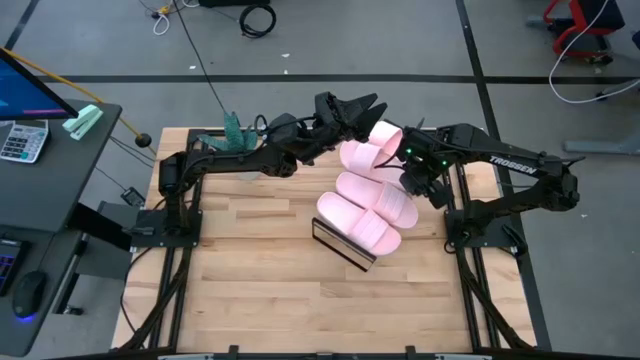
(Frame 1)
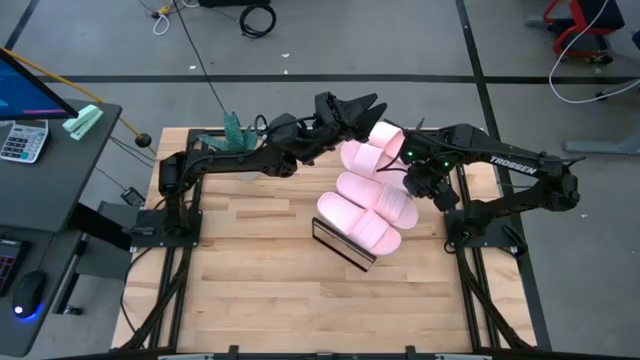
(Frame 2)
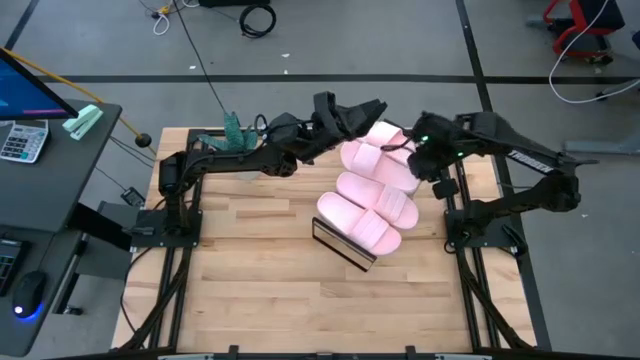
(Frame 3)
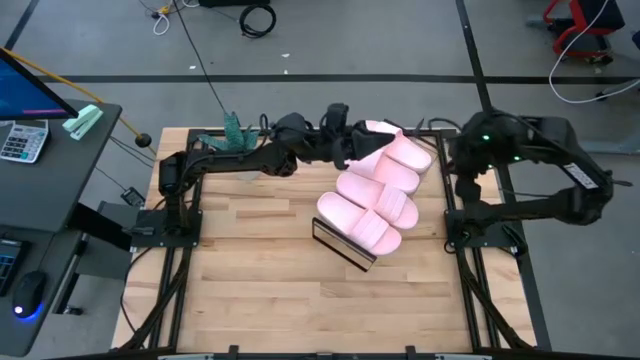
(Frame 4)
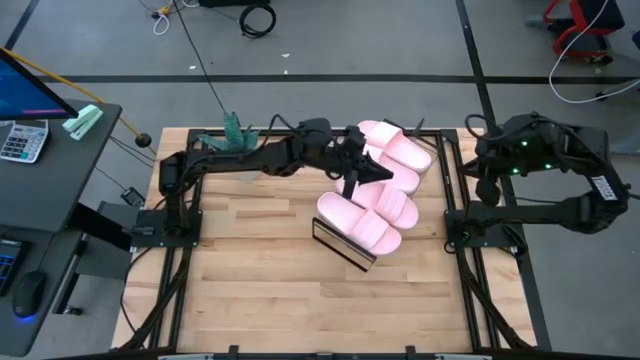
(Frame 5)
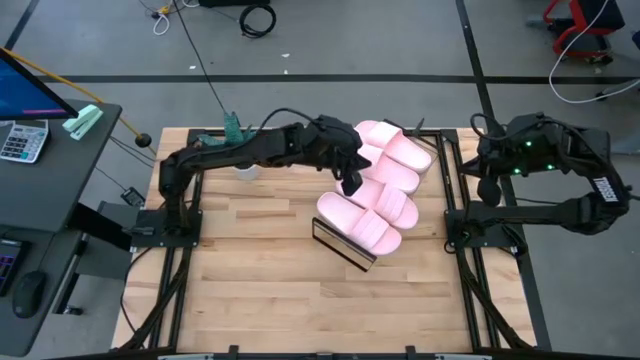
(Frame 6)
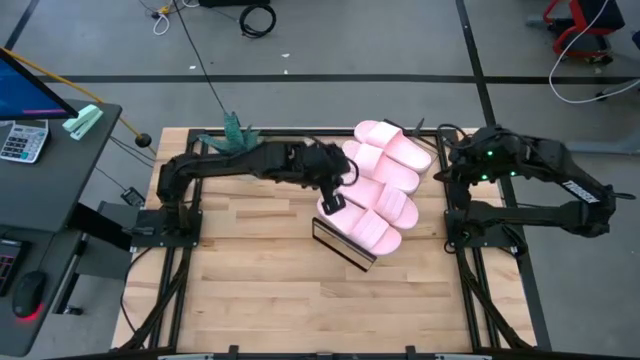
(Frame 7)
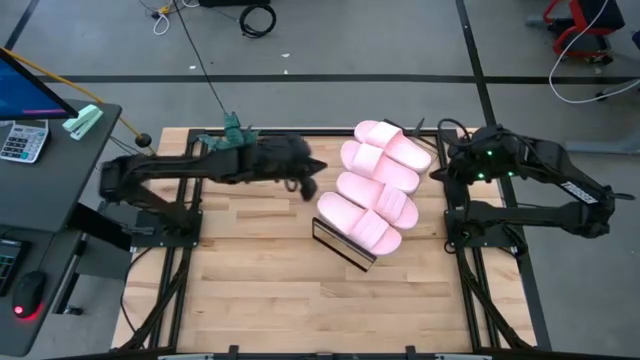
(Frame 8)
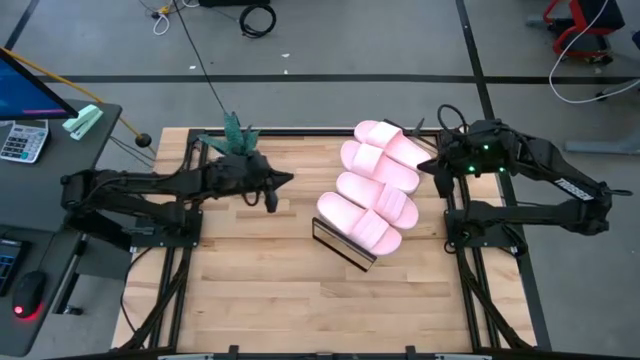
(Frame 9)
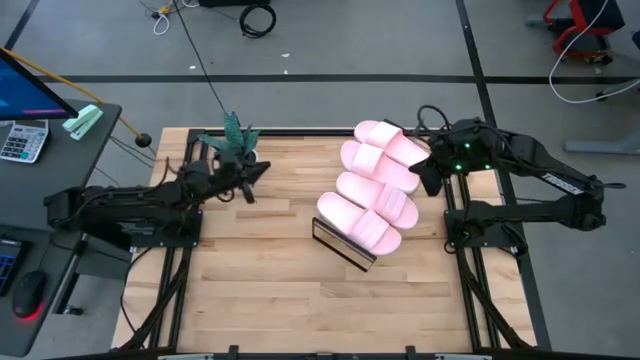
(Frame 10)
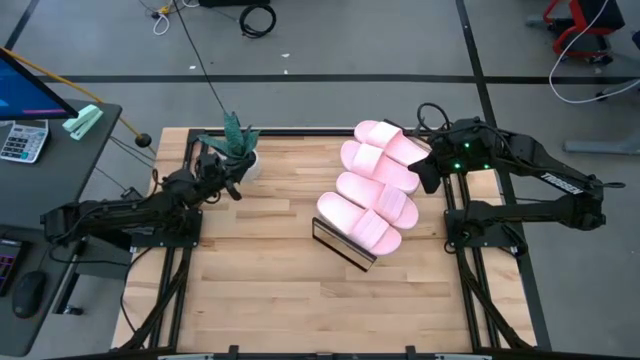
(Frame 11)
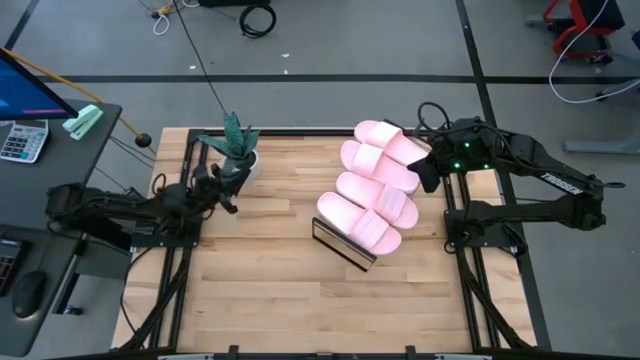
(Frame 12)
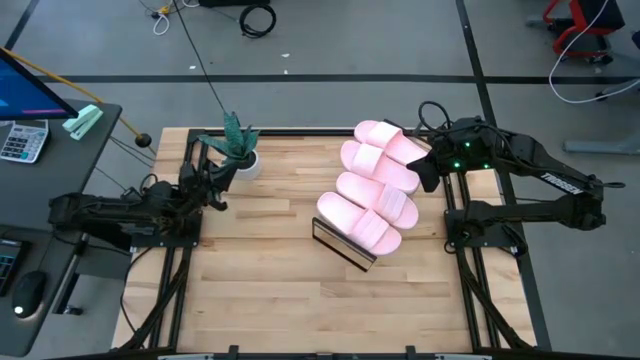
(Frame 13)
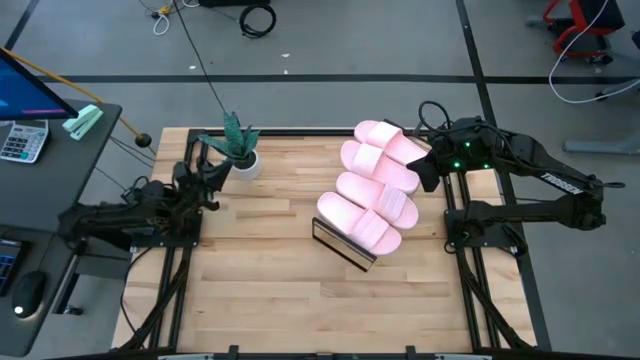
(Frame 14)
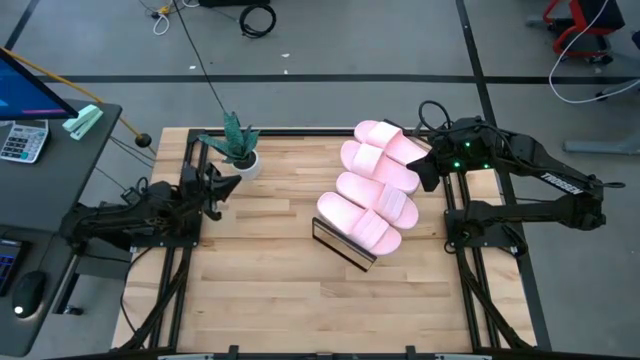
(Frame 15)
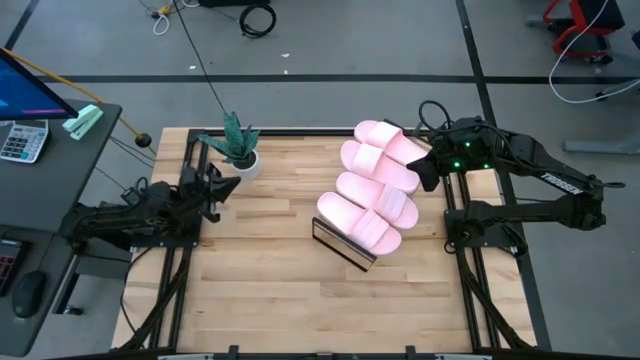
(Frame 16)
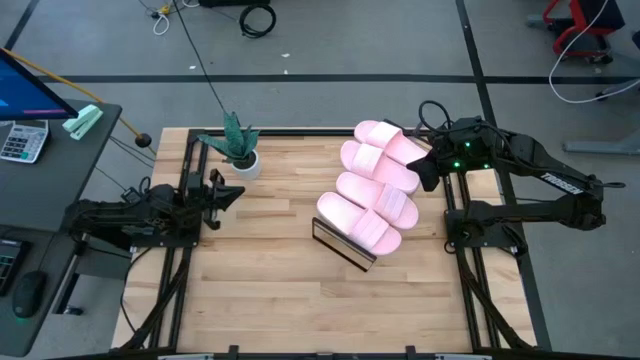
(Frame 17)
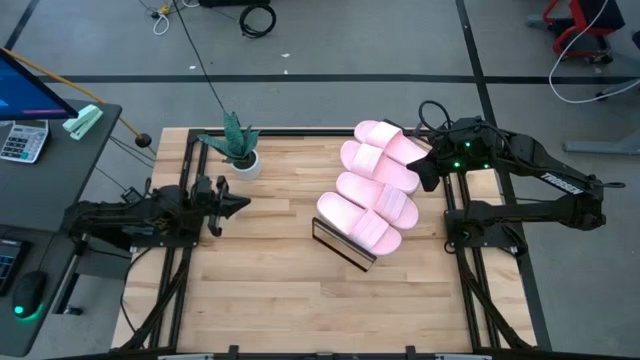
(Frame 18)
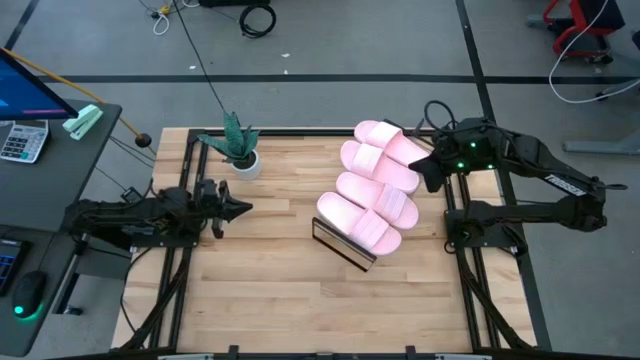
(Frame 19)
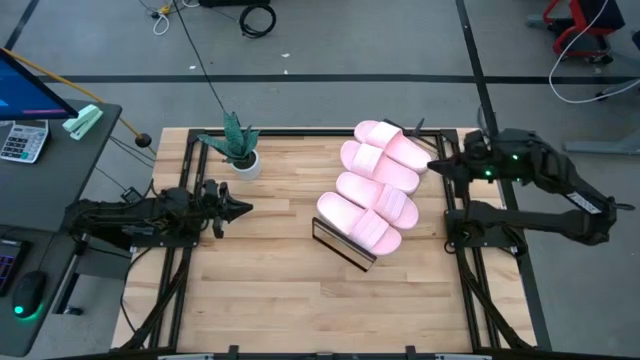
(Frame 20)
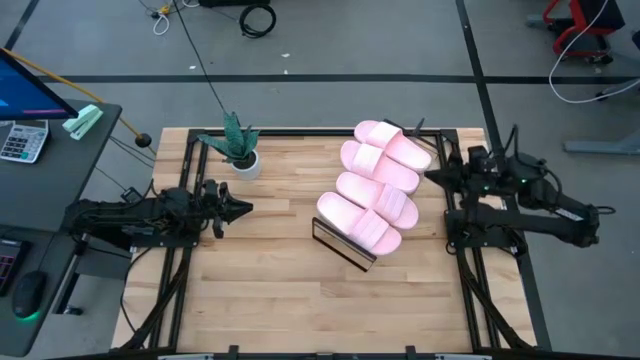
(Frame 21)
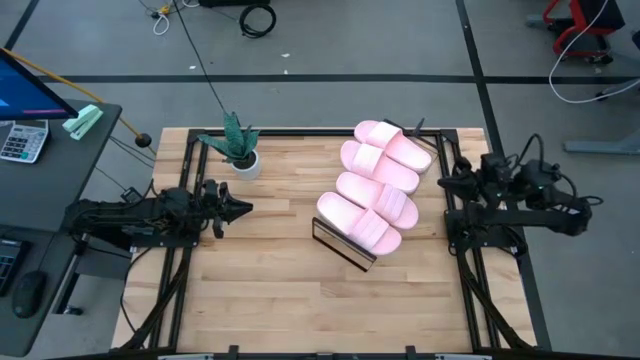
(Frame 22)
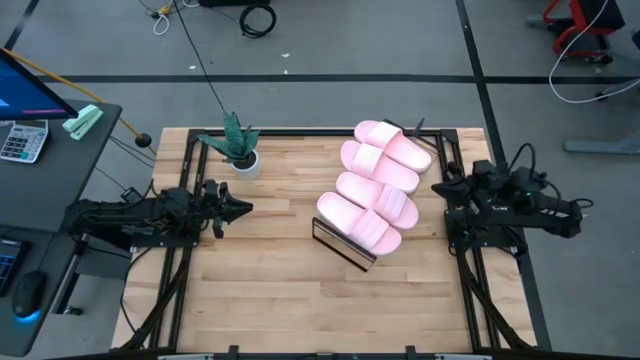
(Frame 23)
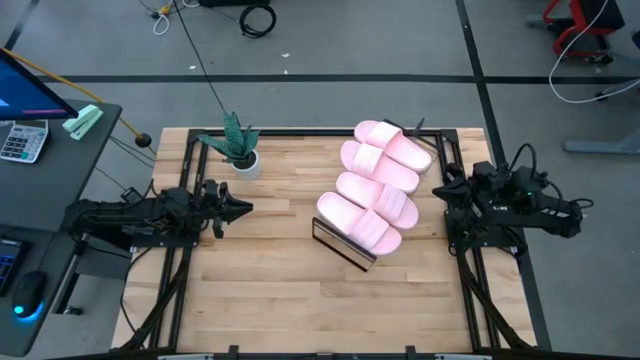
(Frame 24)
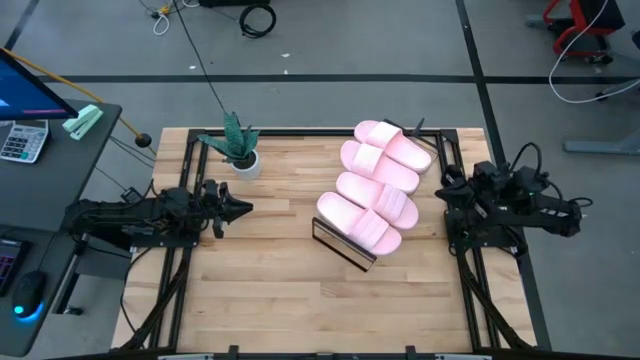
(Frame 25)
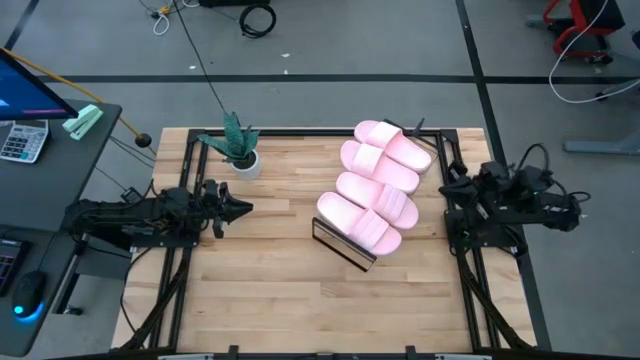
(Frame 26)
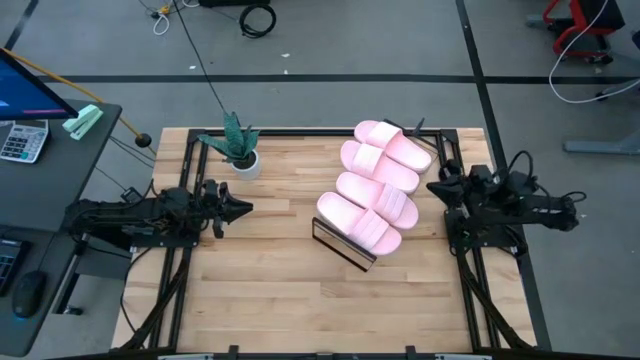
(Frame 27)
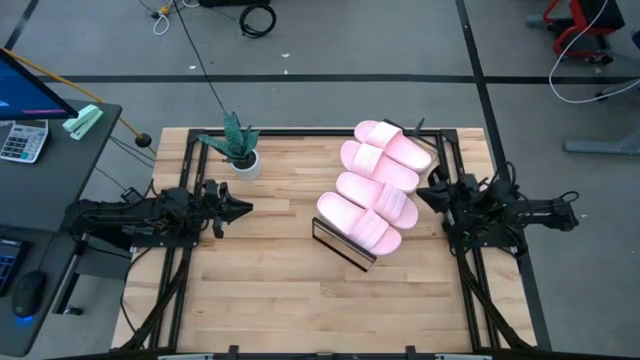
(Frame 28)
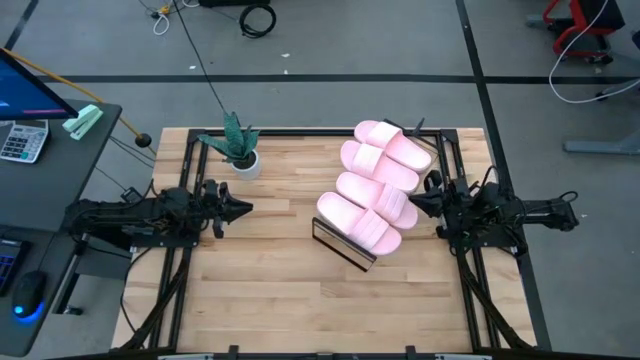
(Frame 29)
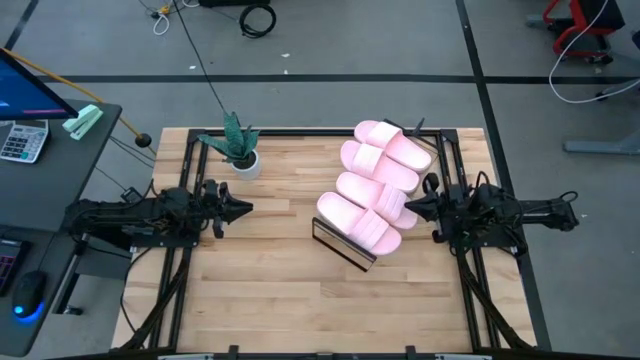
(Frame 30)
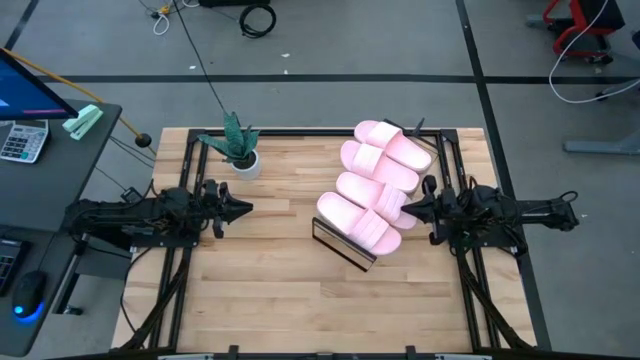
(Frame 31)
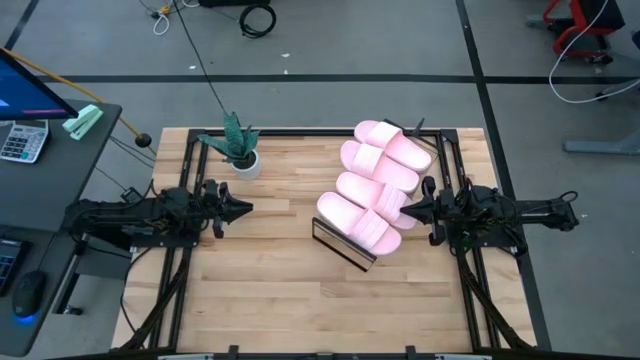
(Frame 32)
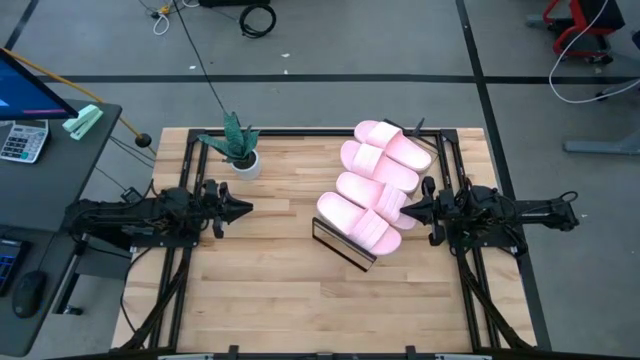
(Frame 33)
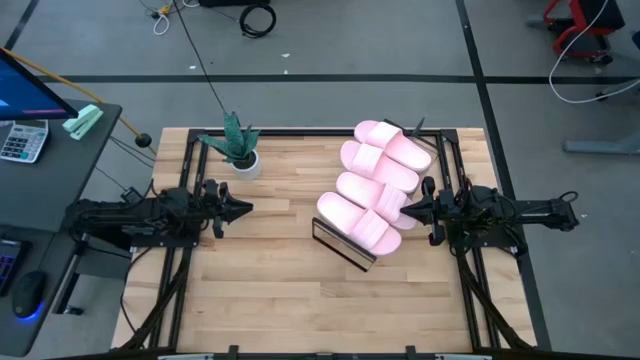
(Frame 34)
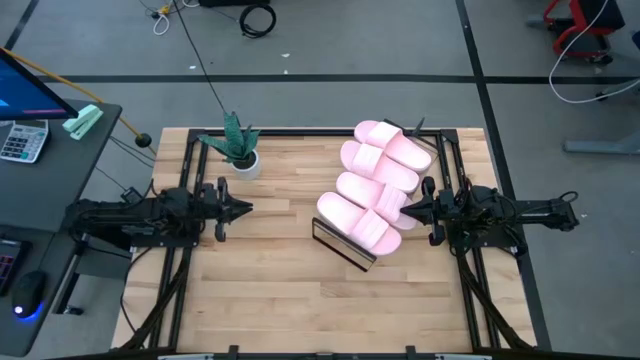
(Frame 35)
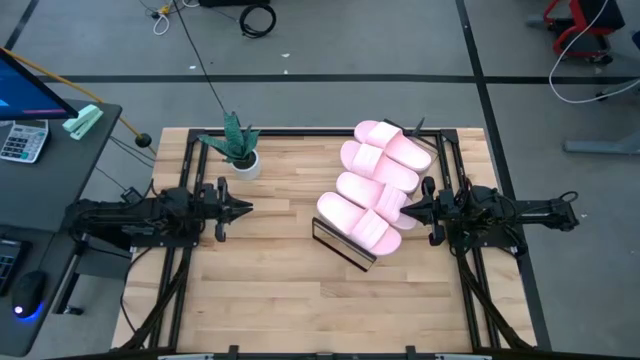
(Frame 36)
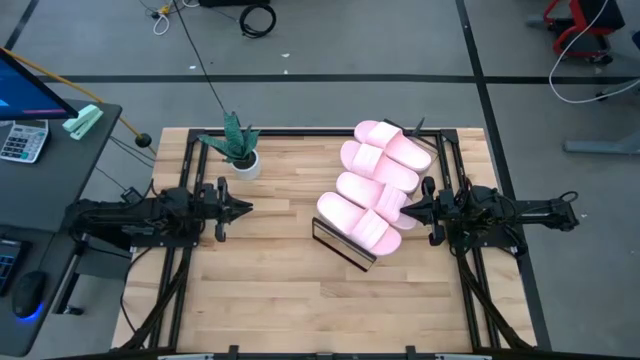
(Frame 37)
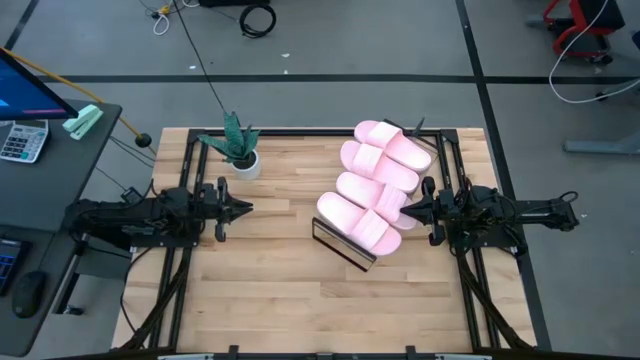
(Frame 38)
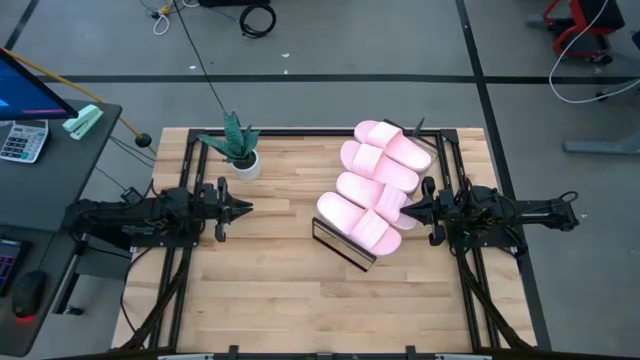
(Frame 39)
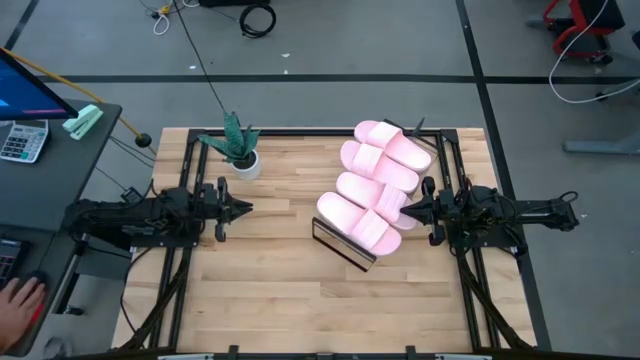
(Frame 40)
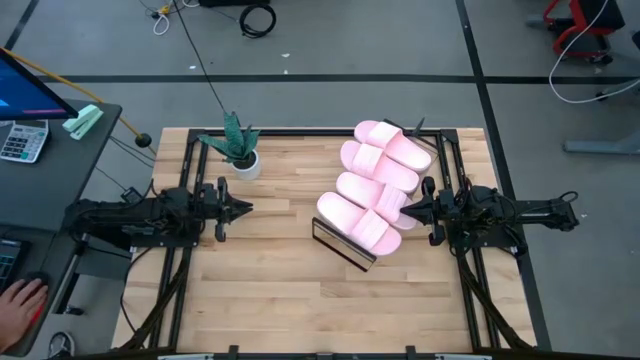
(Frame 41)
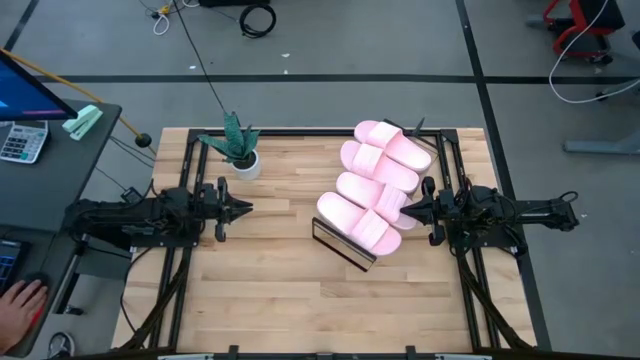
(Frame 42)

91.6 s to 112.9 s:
Task: Pick and place slides into the shelf
Return to Home Position
